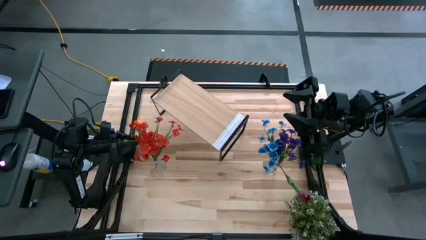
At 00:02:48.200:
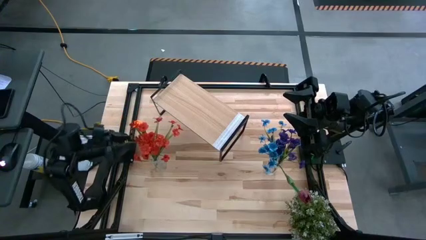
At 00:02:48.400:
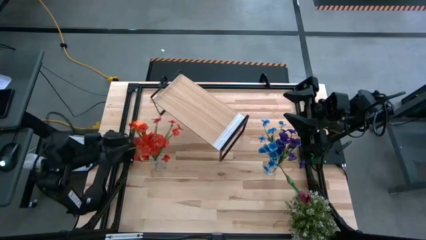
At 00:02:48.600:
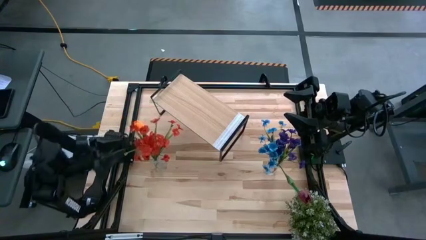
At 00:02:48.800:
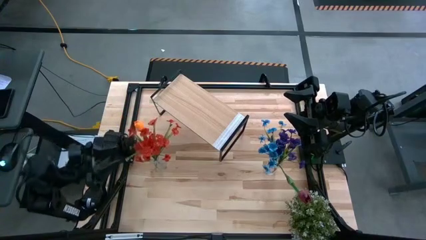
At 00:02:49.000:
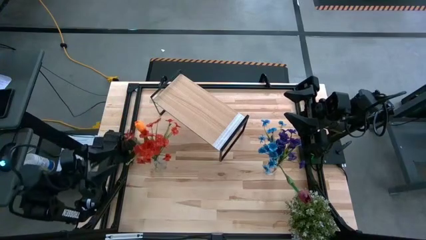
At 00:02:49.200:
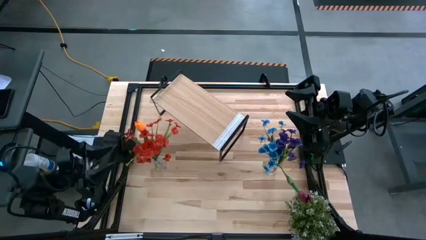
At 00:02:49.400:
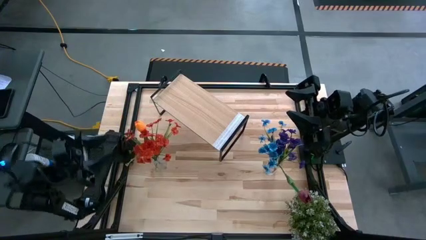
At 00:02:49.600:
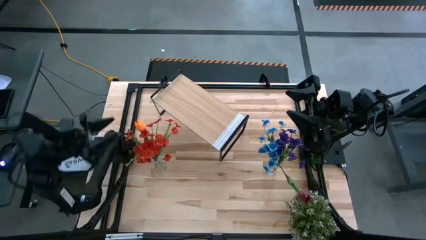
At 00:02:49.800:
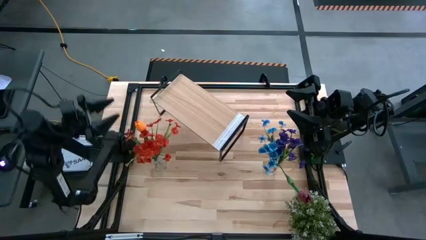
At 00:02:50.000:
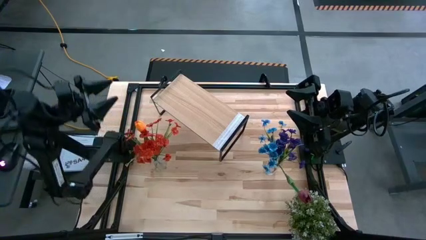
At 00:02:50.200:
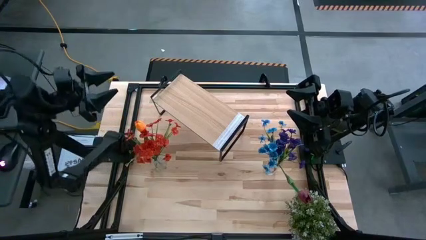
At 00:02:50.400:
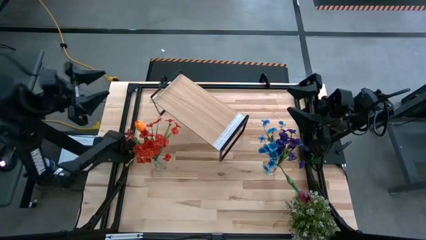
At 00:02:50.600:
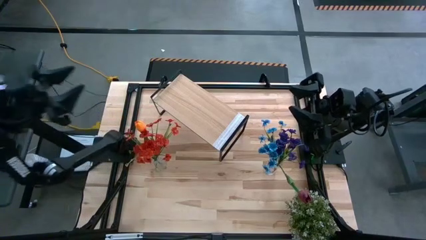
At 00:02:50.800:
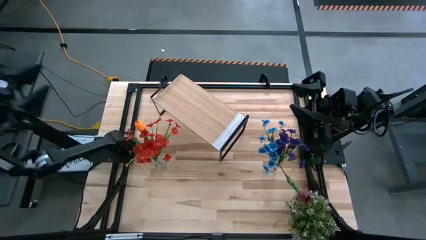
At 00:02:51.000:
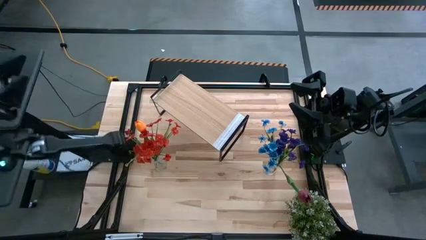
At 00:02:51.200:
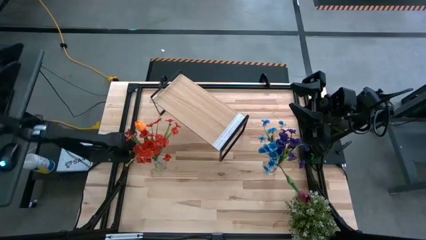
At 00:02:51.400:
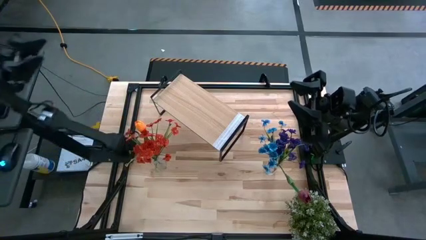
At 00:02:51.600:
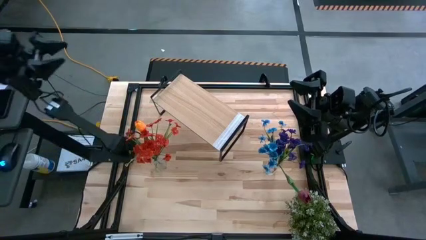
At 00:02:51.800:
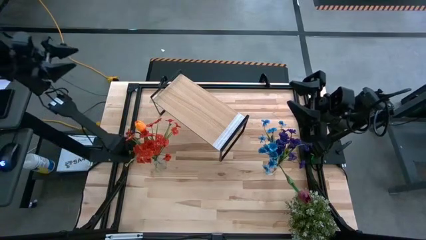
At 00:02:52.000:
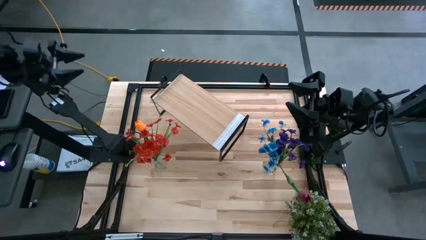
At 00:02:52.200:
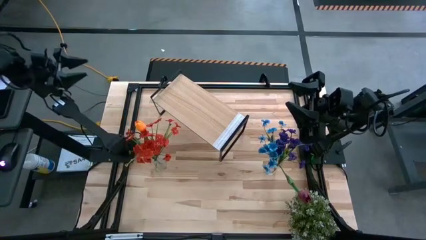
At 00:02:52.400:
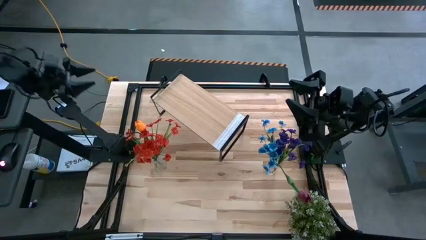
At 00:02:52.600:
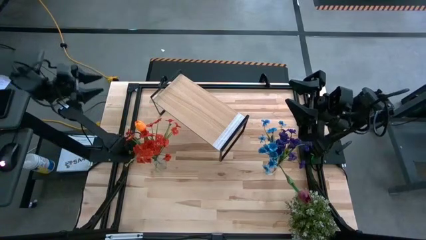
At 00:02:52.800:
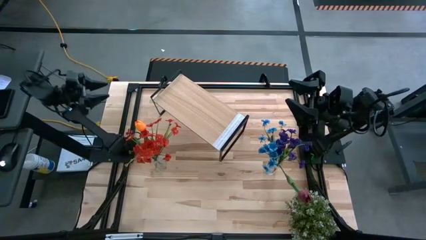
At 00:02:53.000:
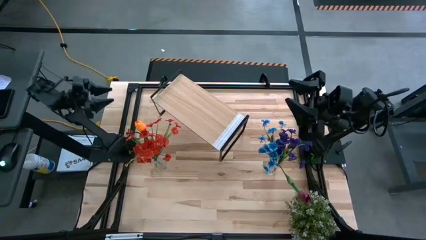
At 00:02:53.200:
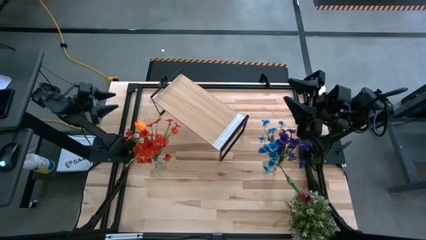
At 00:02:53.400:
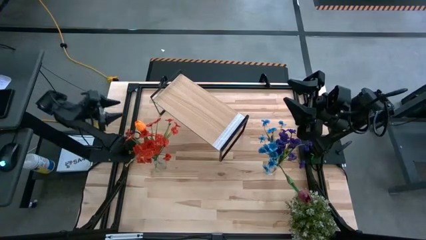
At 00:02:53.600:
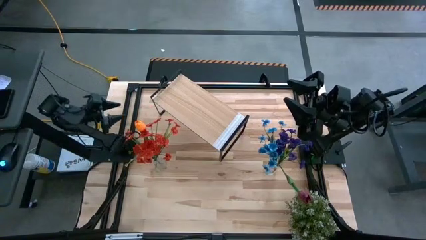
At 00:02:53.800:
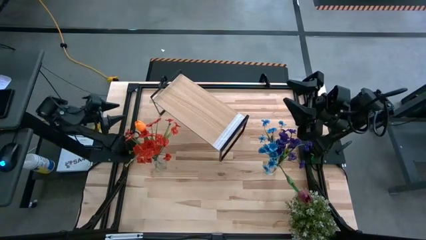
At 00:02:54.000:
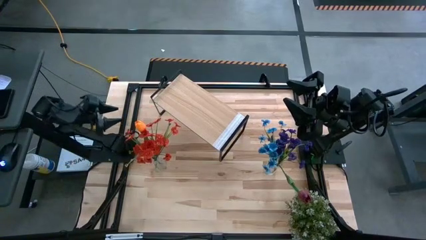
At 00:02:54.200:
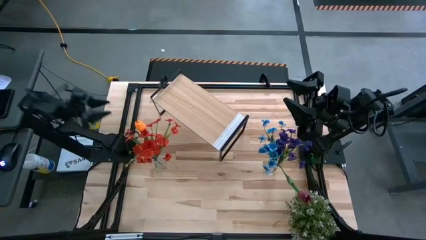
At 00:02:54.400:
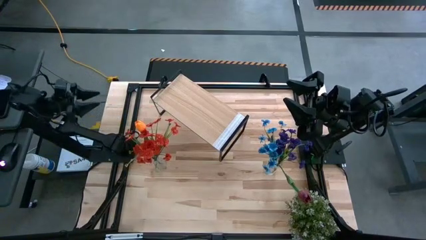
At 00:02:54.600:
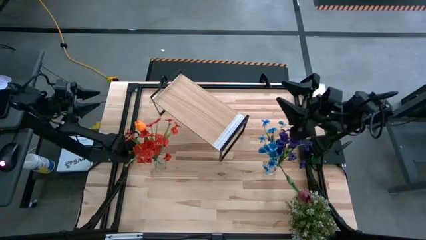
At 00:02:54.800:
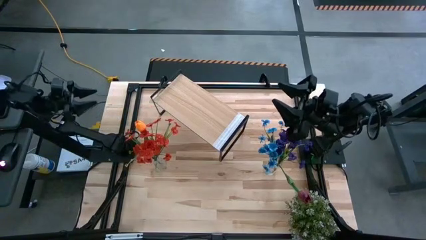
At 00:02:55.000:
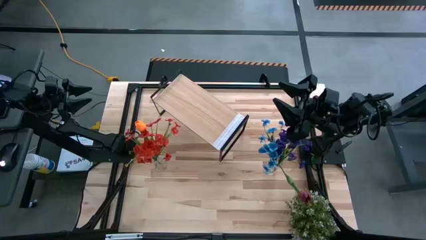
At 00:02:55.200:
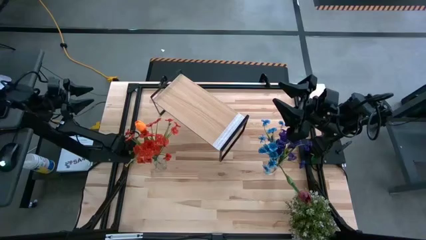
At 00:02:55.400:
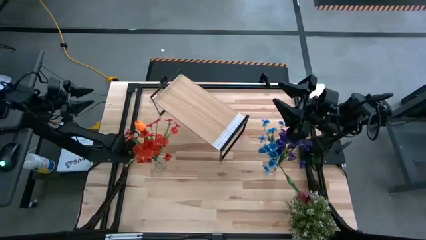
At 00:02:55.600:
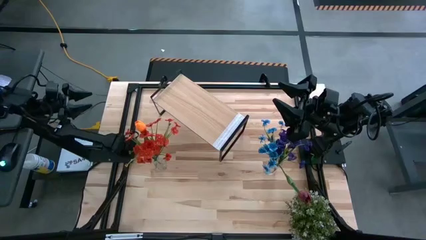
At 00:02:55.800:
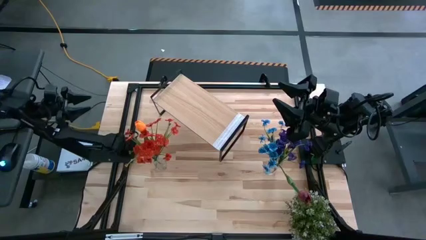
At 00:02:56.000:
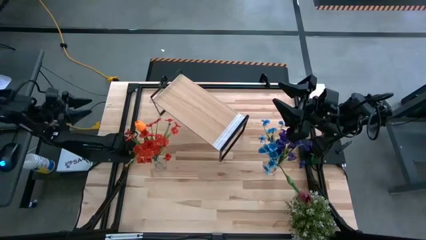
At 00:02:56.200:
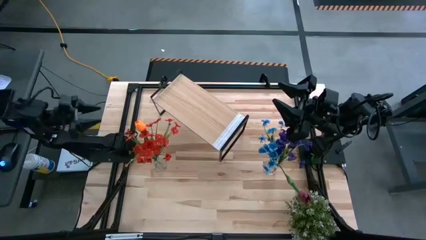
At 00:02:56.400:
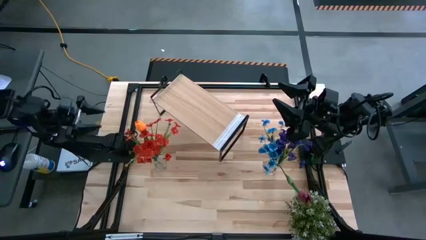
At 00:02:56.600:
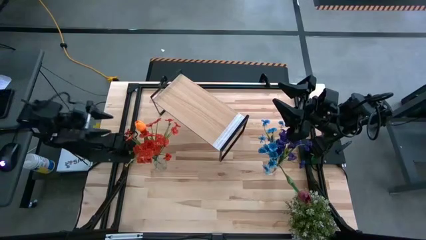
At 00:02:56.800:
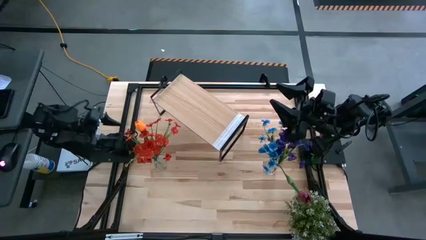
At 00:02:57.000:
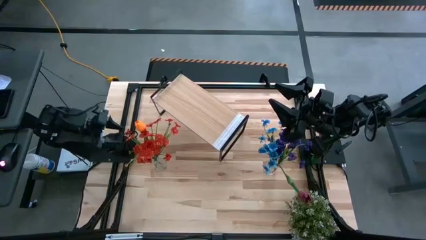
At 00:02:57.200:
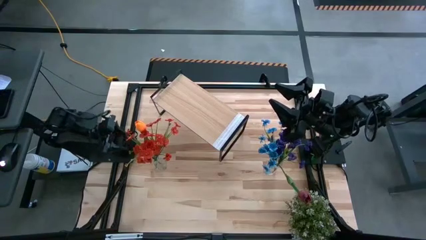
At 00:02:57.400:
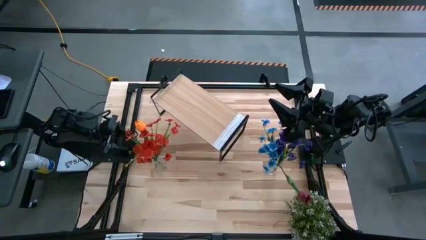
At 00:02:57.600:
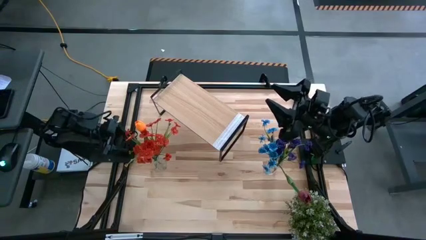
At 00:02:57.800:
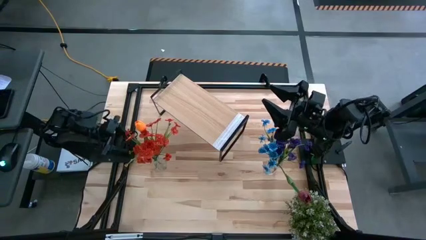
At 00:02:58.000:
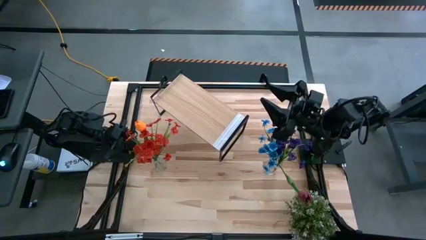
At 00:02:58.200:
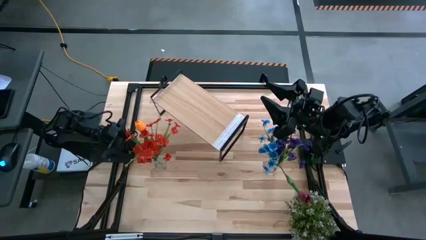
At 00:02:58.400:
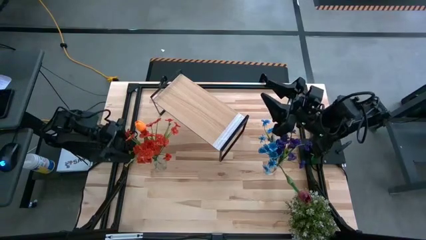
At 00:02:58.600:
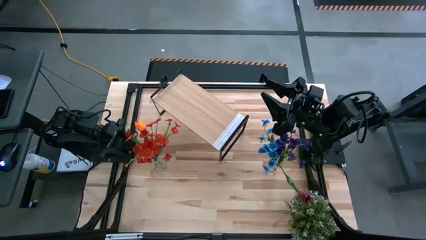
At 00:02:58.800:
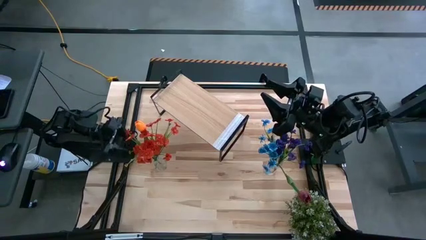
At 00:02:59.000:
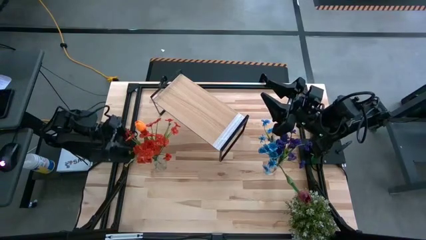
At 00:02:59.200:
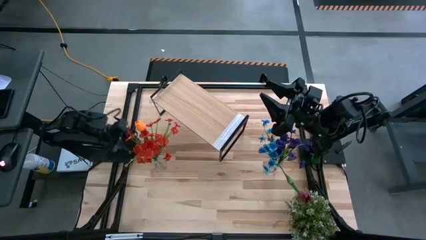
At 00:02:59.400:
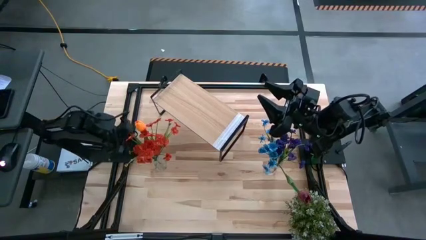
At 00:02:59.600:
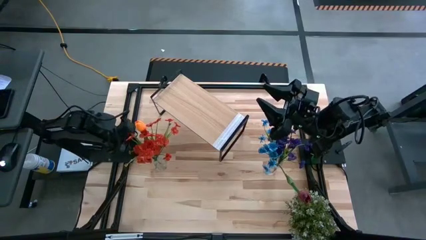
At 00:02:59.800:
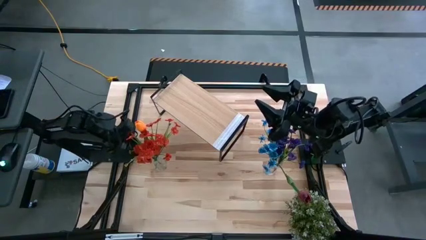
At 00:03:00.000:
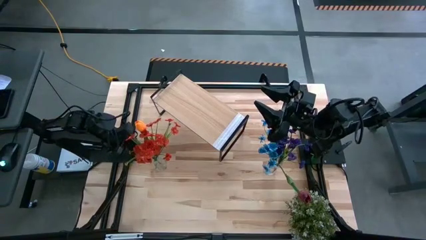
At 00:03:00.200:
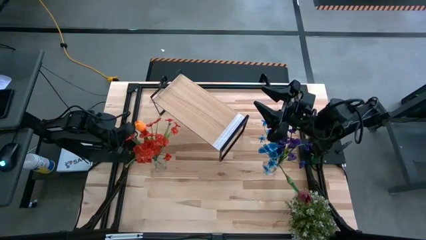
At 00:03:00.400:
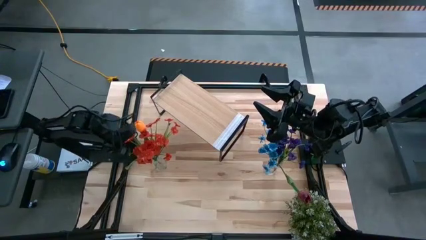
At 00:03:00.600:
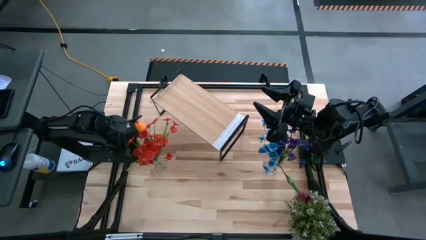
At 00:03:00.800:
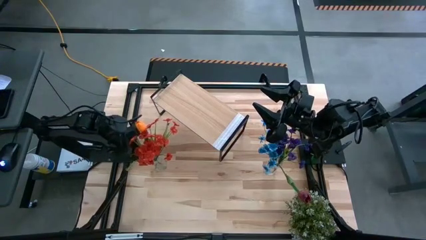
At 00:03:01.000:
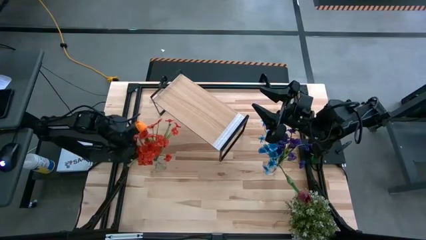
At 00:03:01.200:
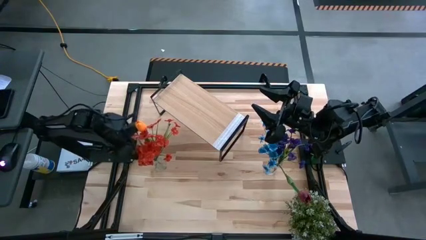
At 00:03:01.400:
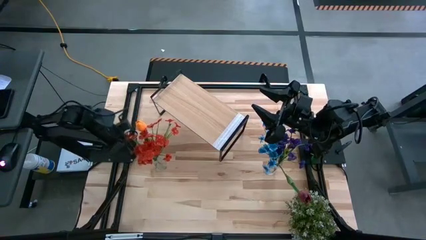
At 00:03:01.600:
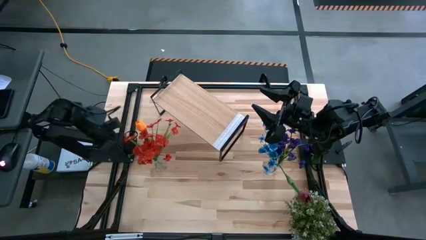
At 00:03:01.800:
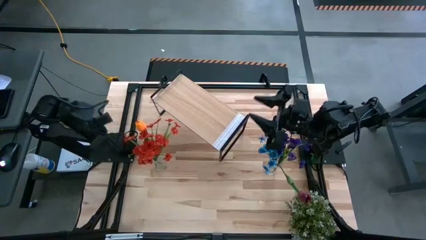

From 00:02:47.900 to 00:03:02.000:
Task: Pick and place flowers into a vace then onto a shelf
Put the left transparent vase on the shelf

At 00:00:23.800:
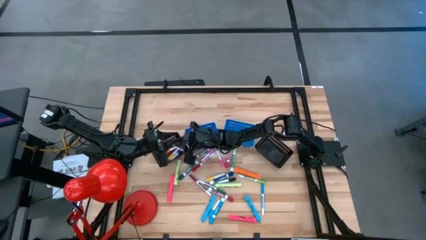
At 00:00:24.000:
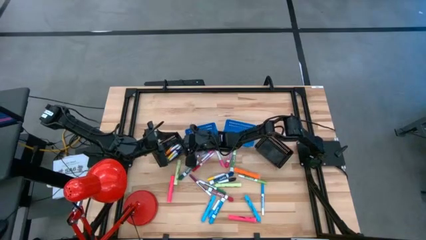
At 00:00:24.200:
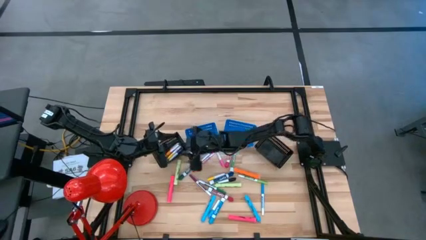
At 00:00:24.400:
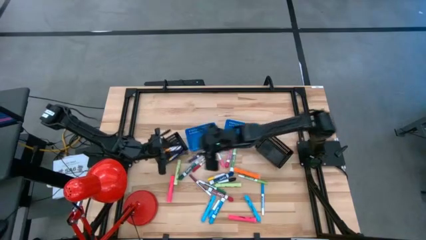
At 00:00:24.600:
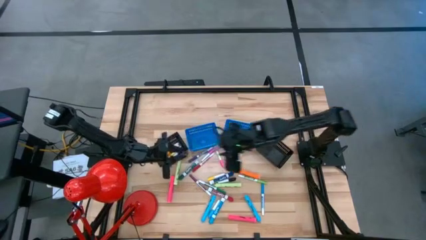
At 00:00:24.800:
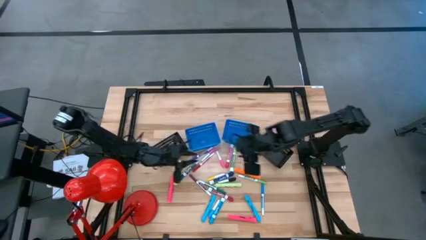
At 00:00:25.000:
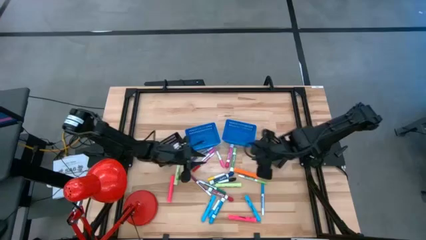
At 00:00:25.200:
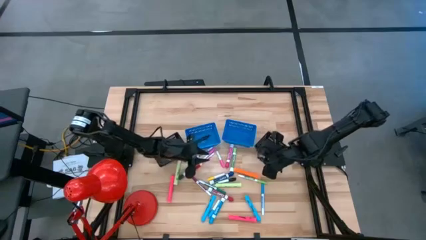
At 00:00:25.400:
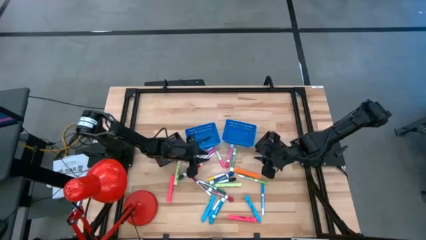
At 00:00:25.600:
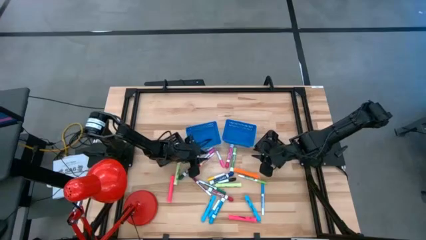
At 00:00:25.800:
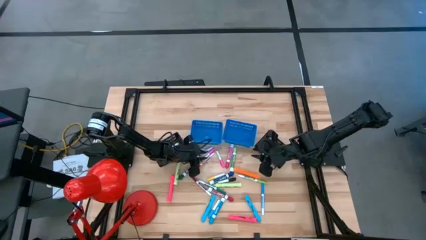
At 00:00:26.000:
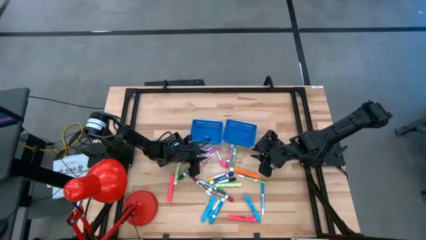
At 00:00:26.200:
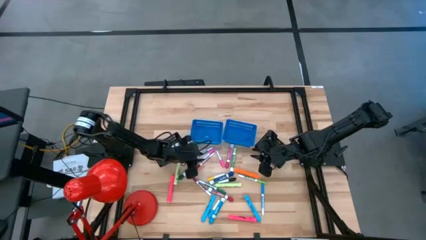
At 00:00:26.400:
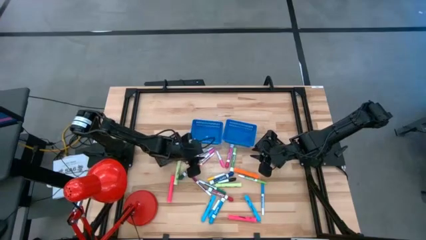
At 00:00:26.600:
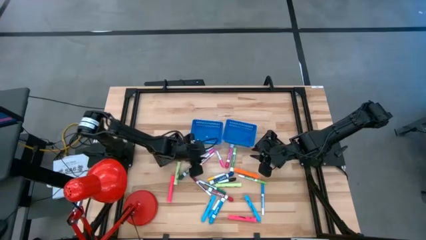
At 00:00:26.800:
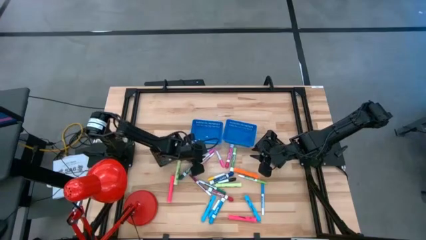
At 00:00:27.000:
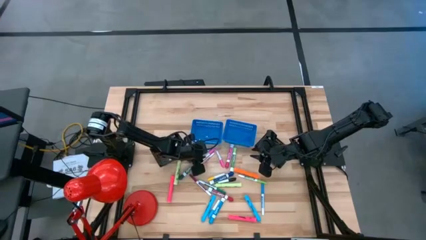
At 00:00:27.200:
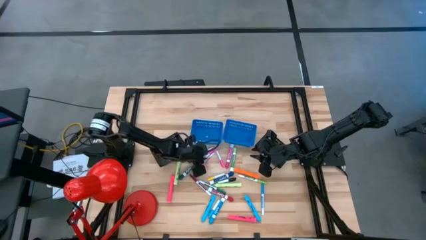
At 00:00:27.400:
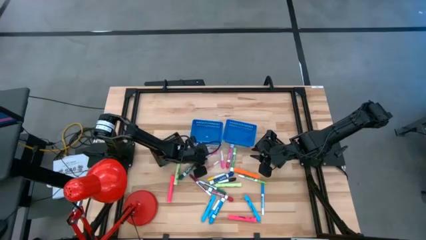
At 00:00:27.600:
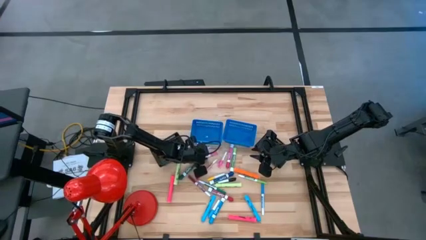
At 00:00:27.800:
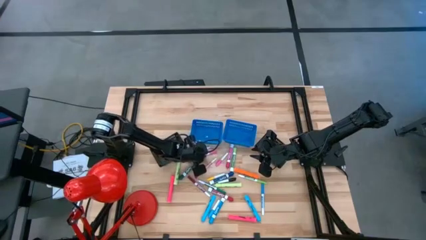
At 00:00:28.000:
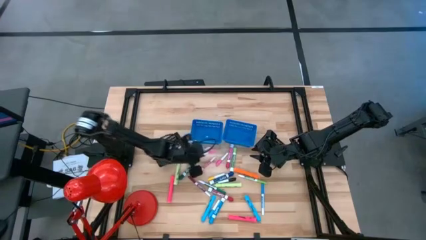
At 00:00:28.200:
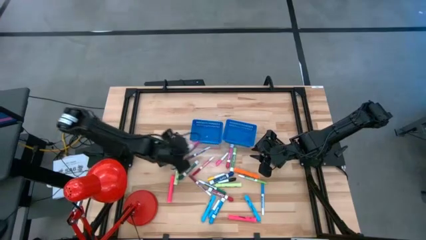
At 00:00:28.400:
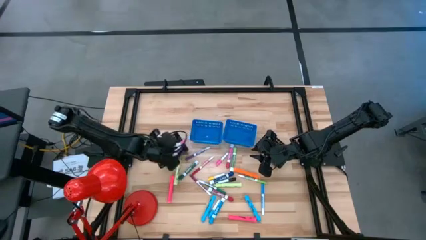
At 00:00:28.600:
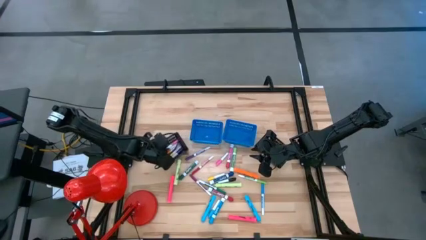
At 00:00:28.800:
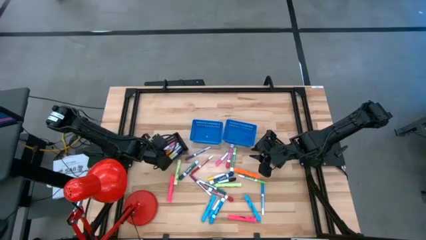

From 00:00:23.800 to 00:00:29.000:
Task: Pick & Place Markers
Put the pink water marker into the left black bin
